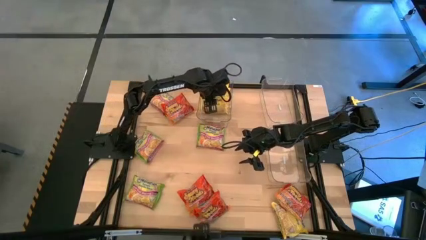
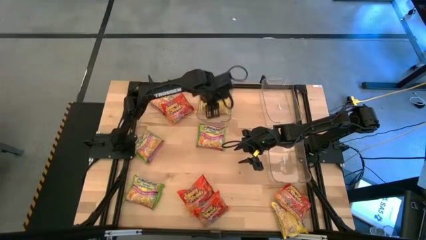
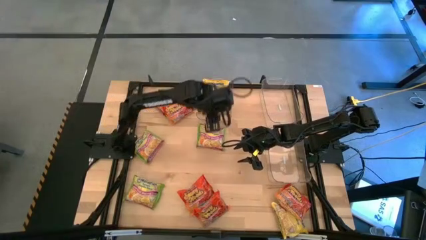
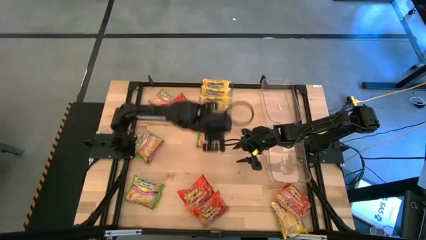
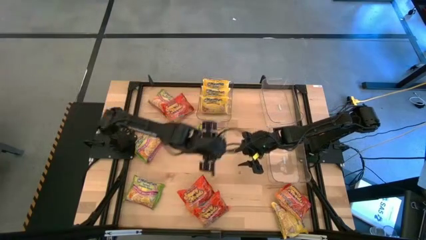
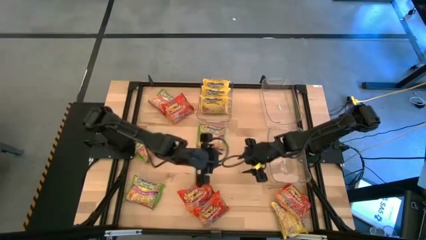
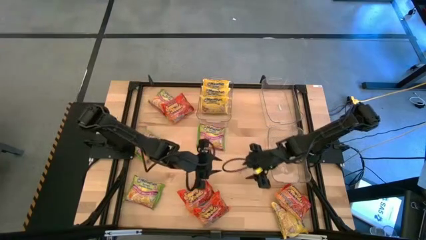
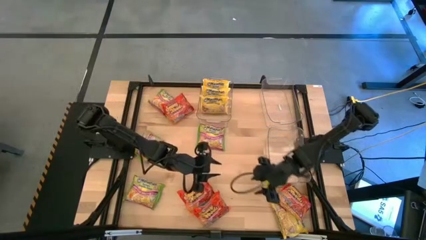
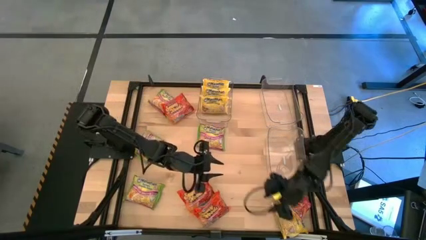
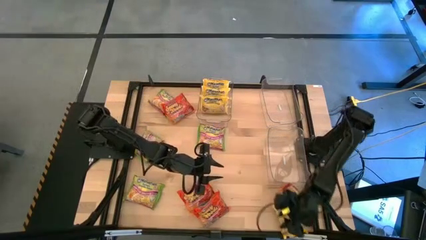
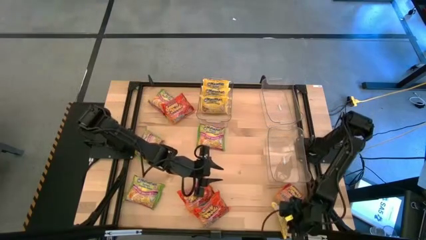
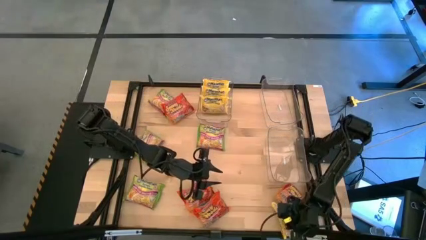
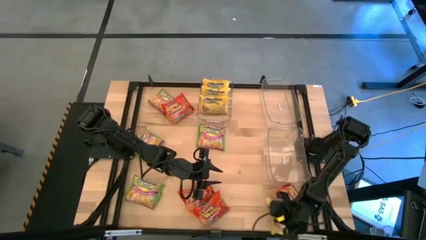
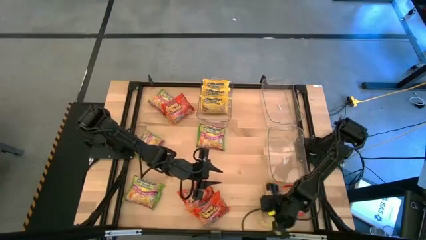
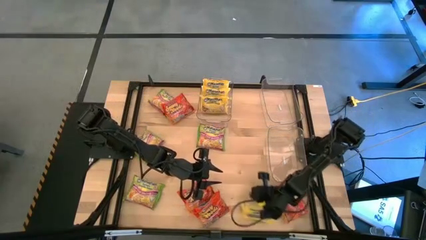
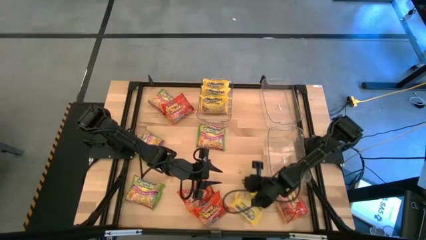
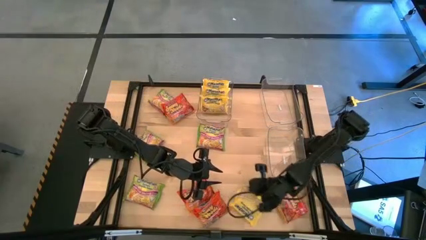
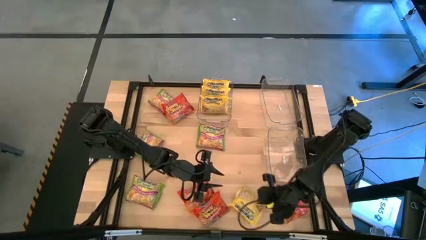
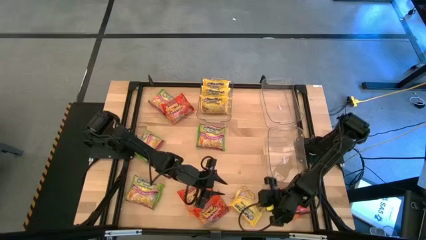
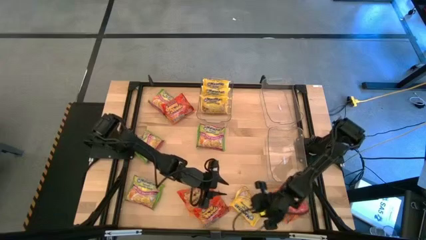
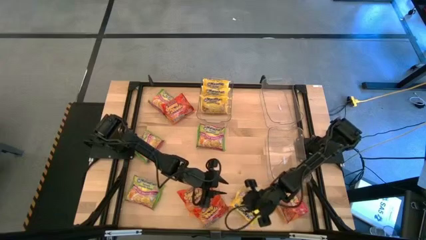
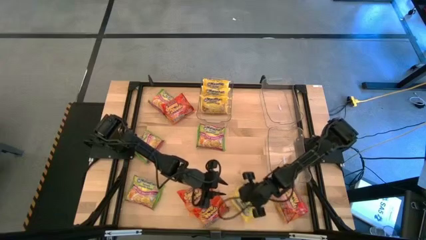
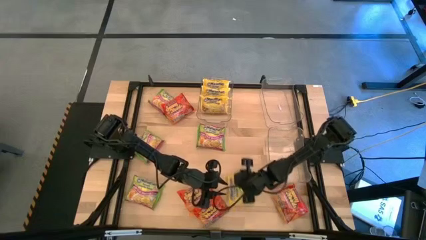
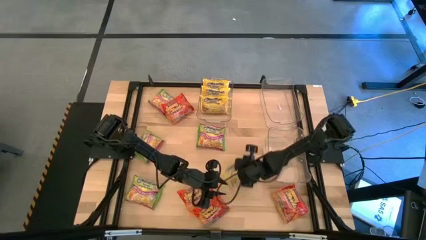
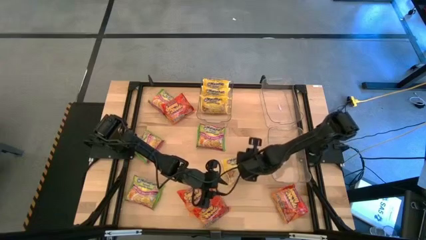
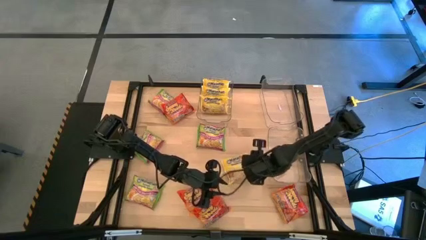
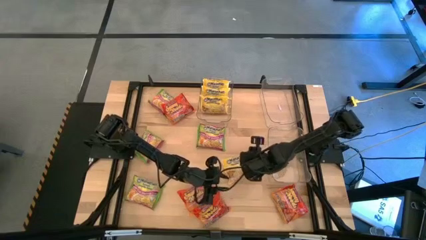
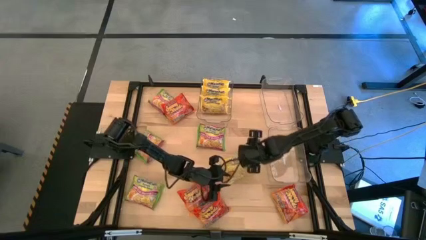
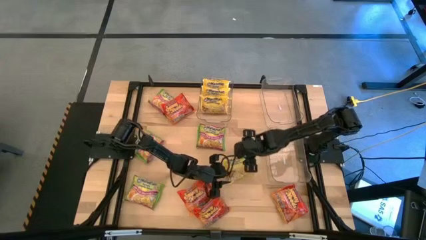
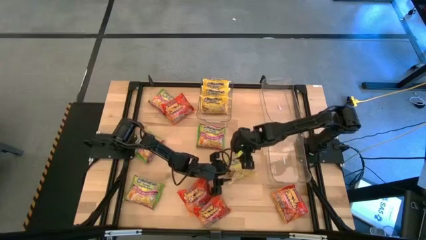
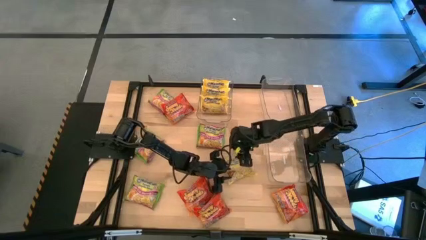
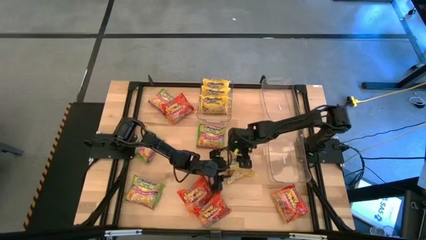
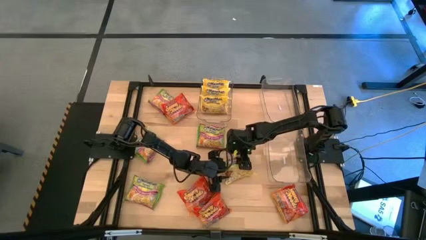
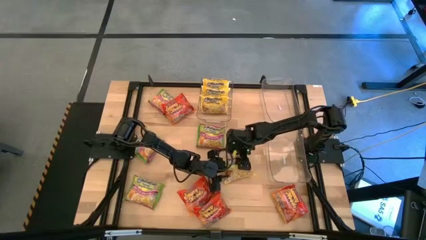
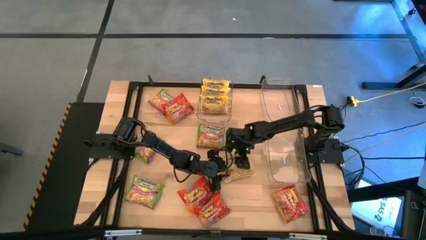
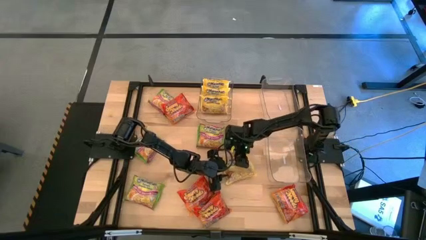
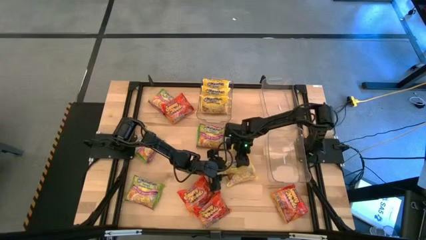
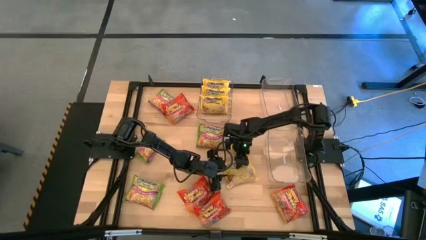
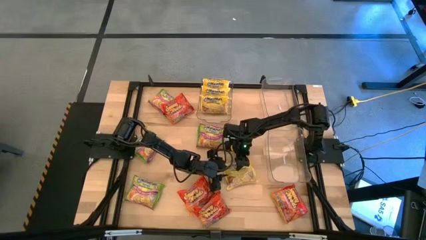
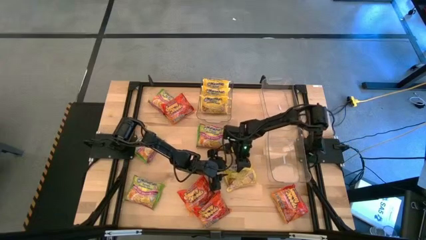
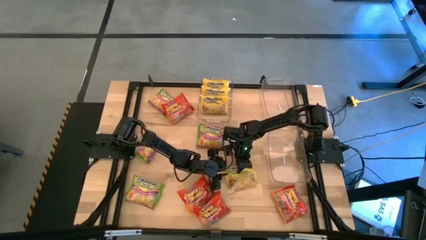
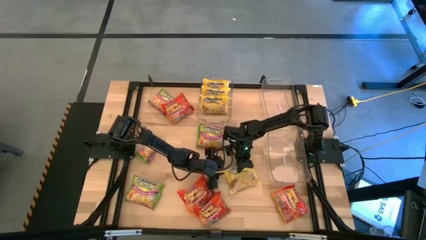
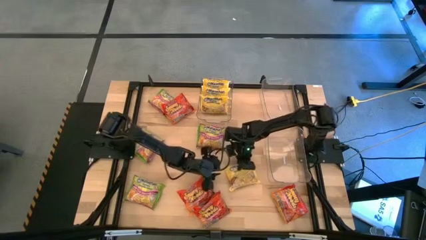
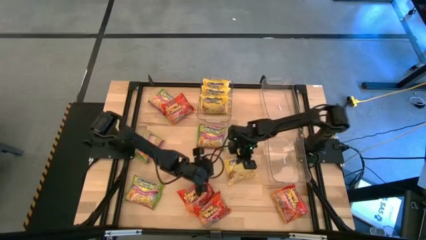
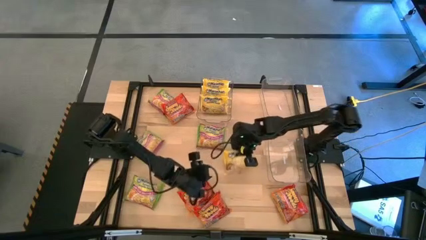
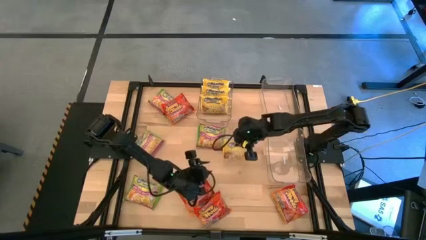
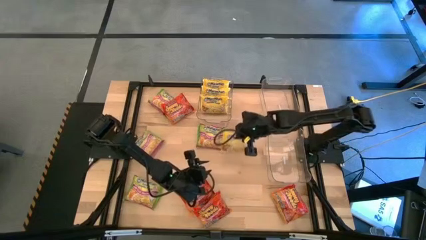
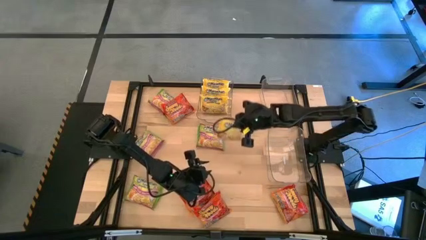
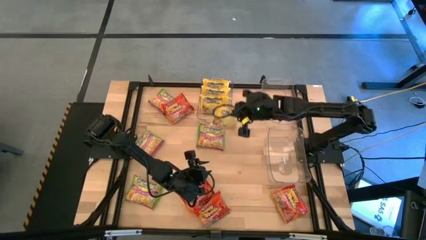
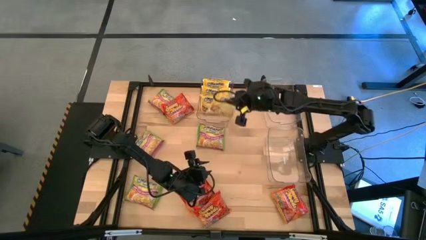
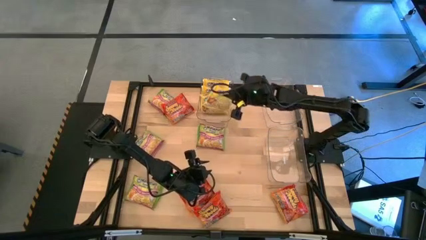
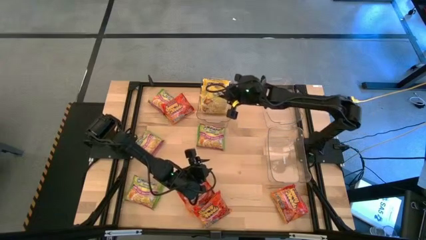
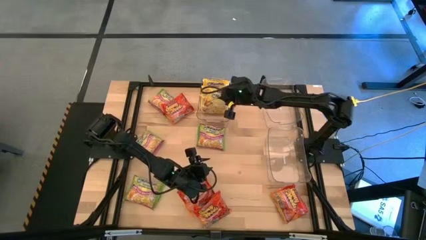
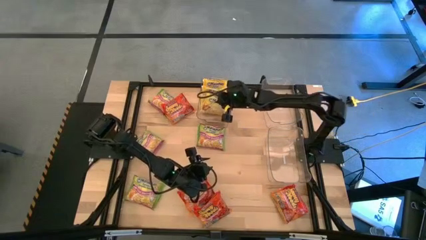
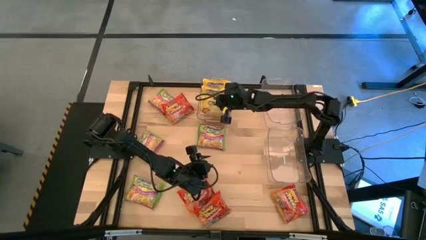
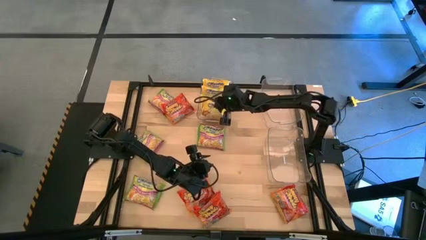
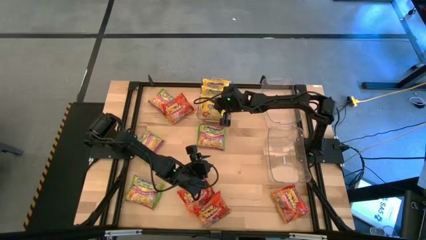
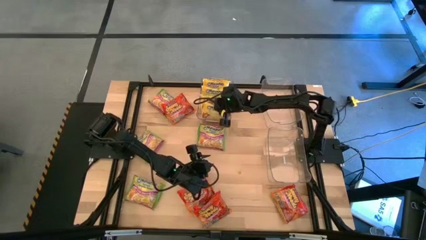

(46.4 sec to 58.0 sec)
Task: Sort Maruchan noodles
Put the yellow noodle pack into the top left transparent bin
